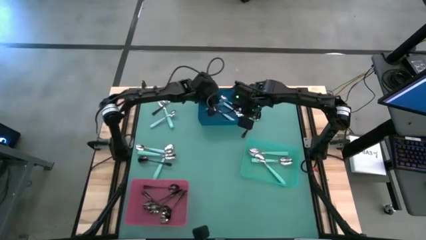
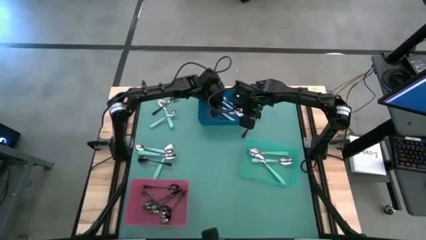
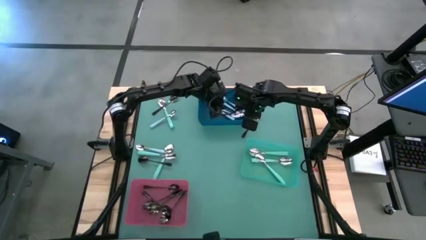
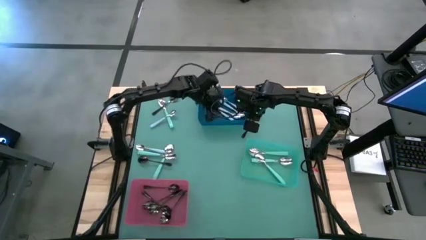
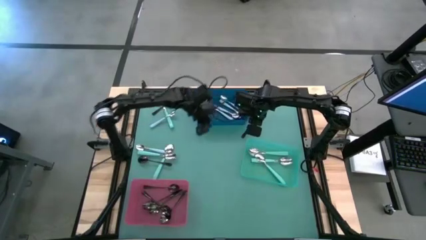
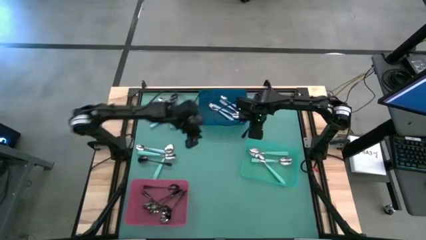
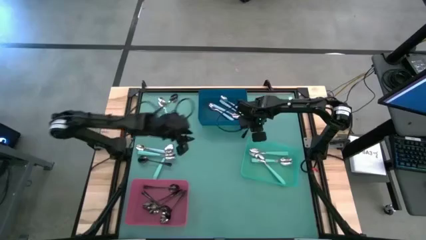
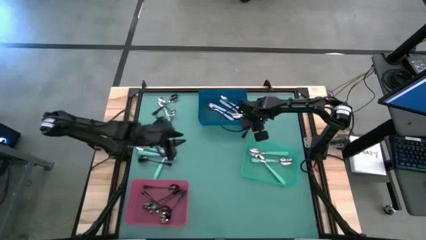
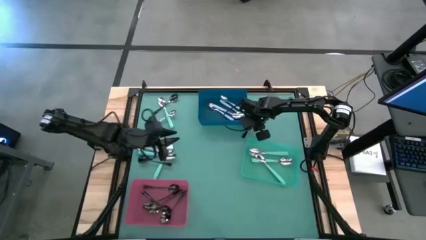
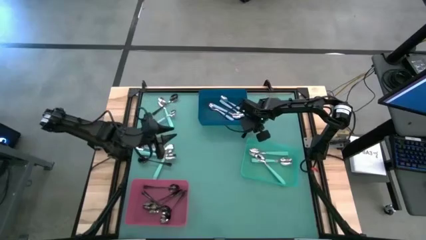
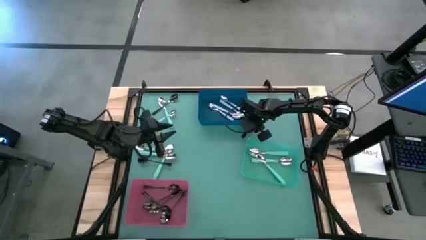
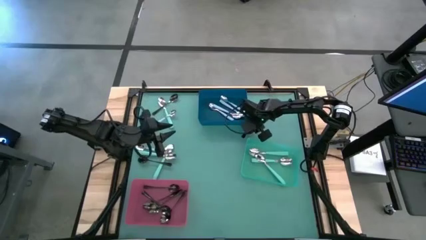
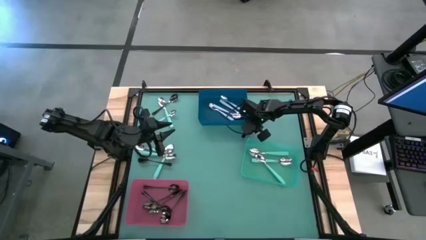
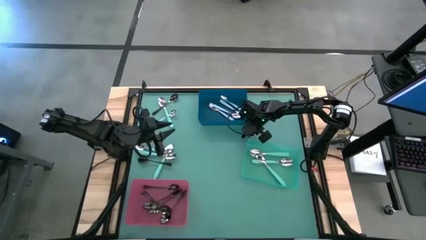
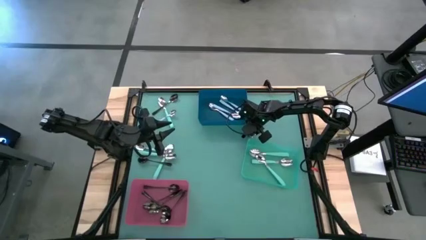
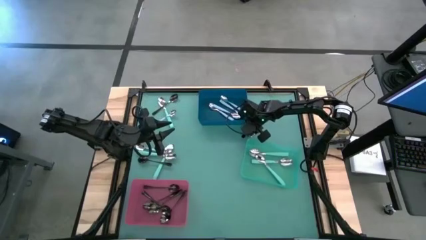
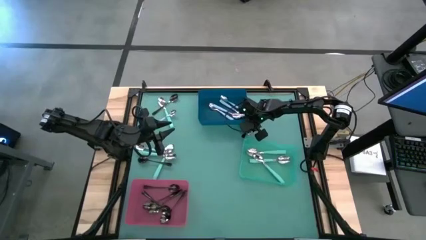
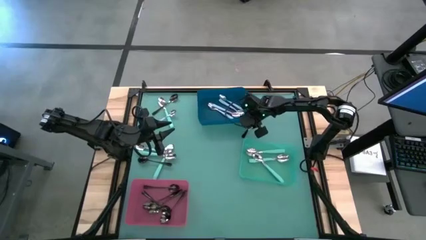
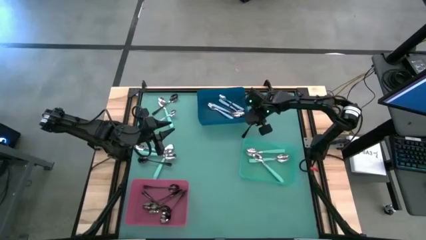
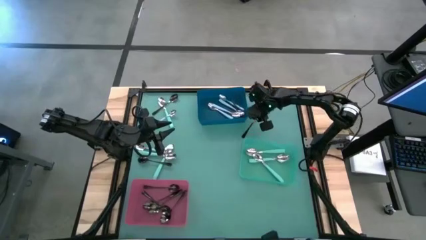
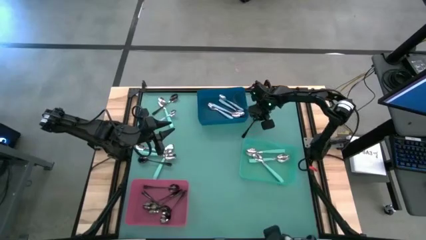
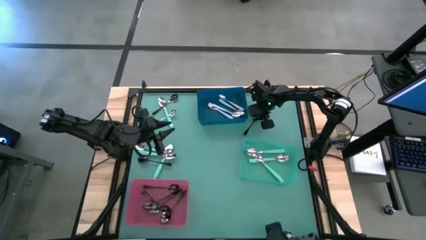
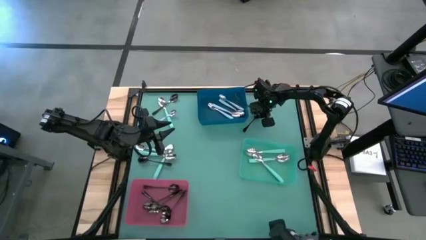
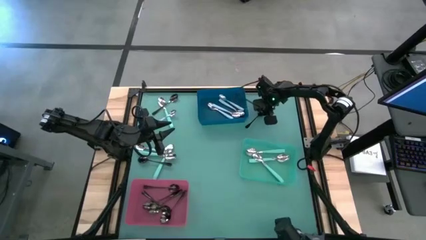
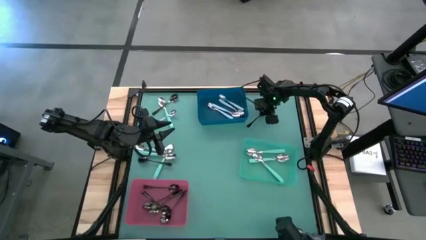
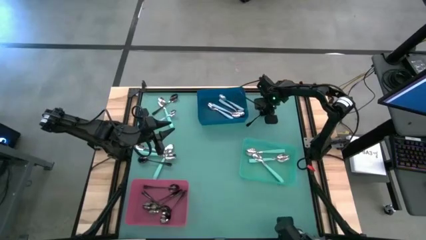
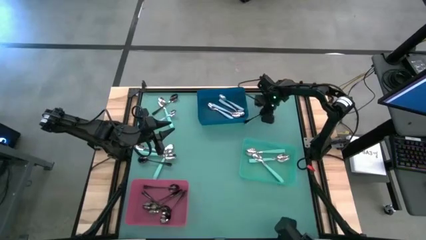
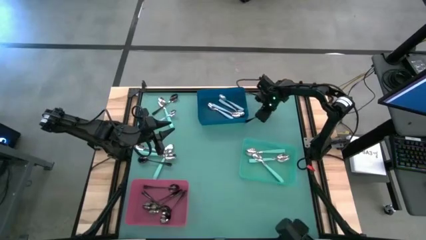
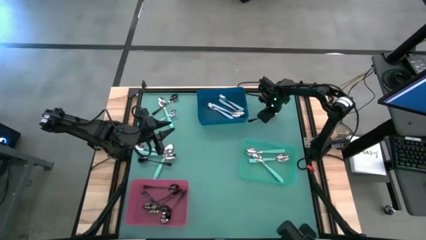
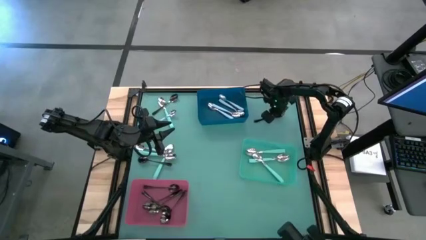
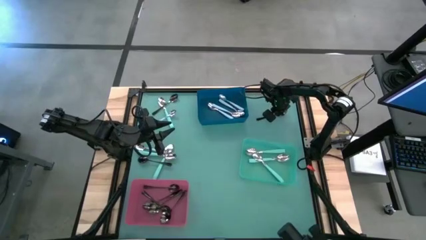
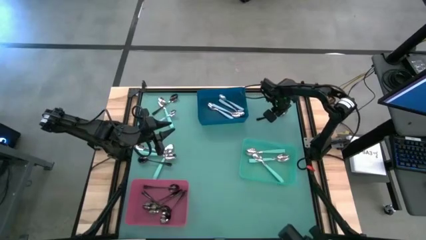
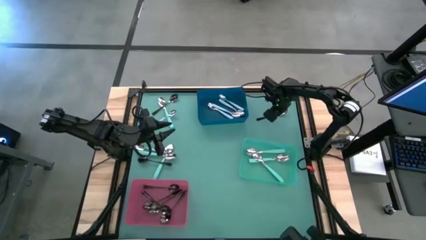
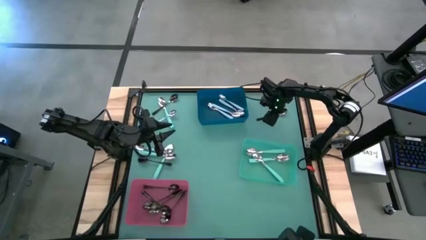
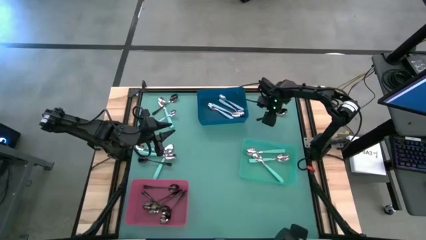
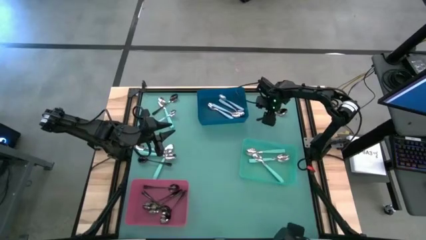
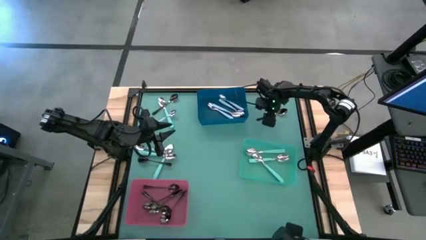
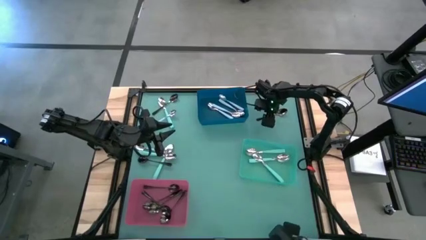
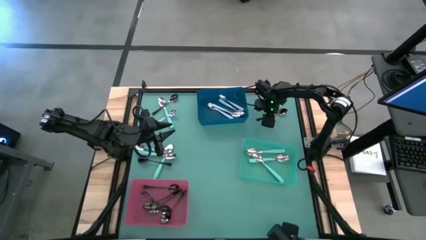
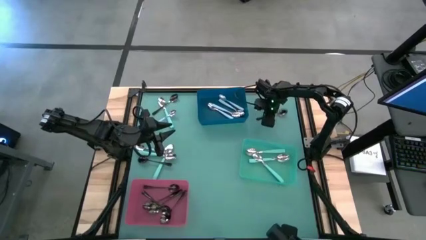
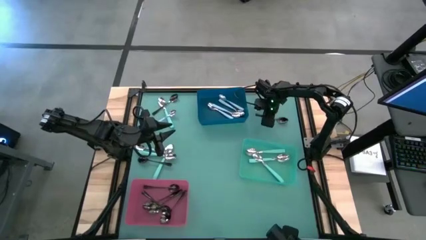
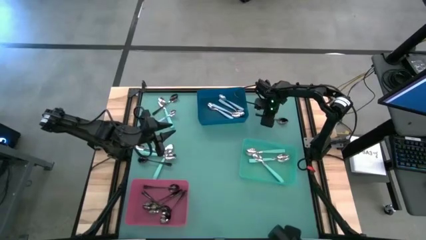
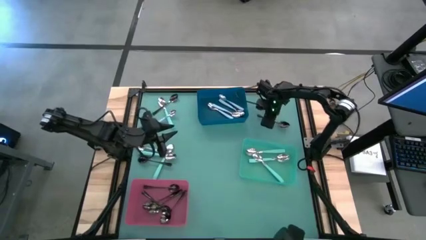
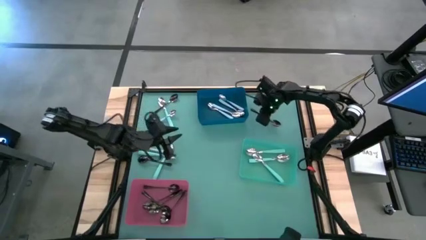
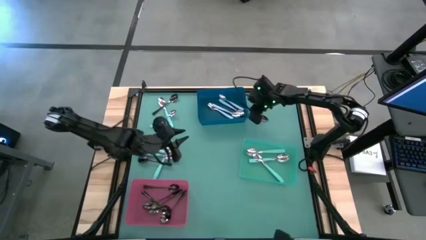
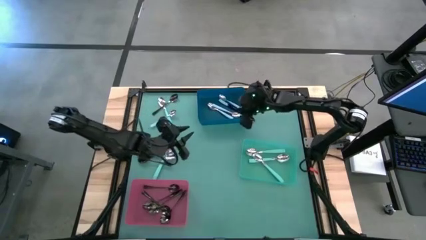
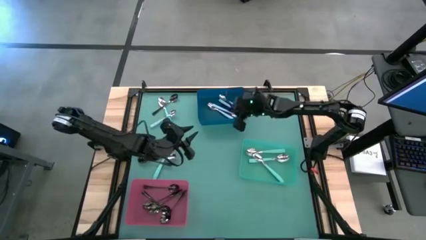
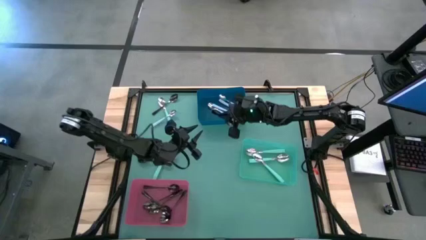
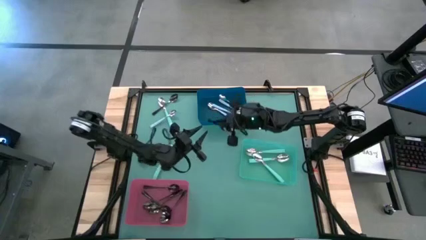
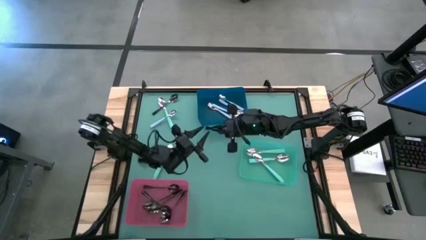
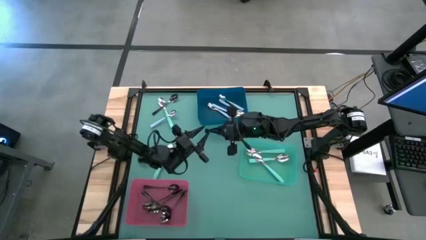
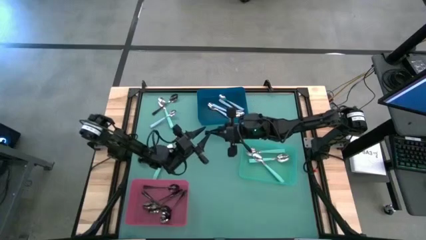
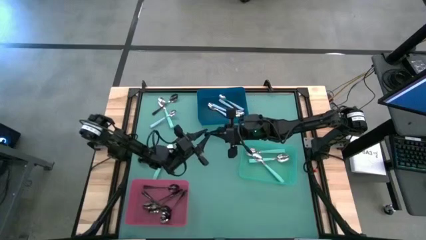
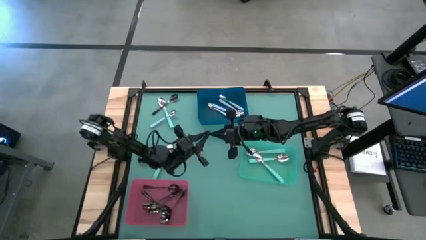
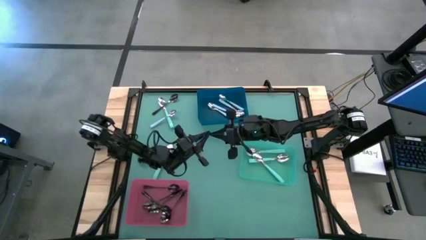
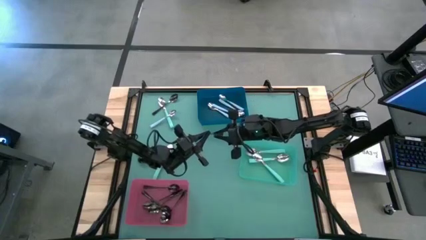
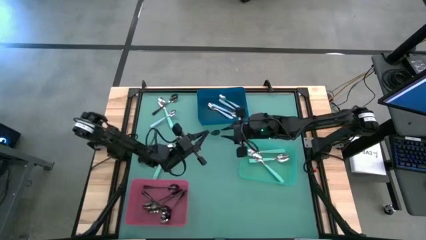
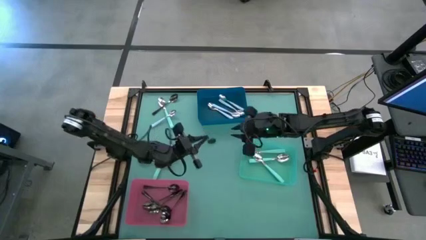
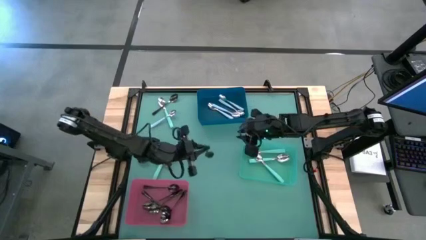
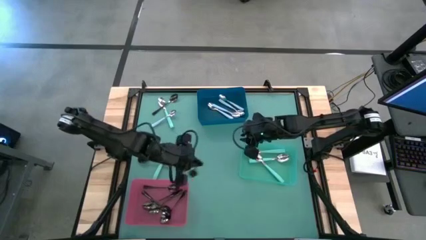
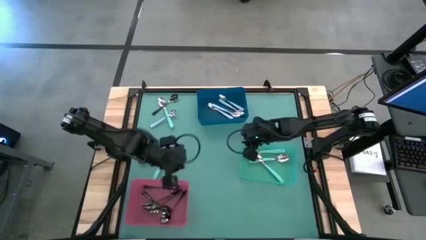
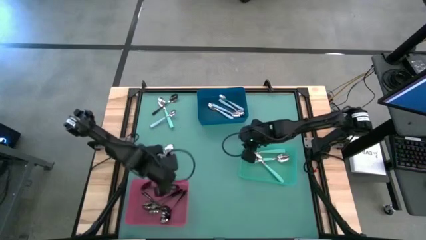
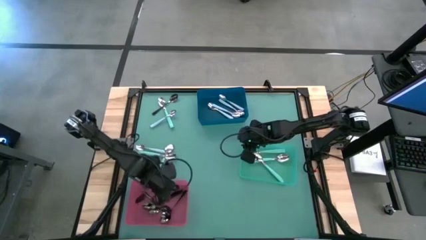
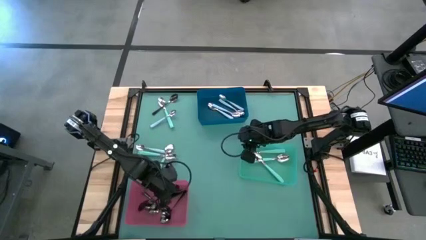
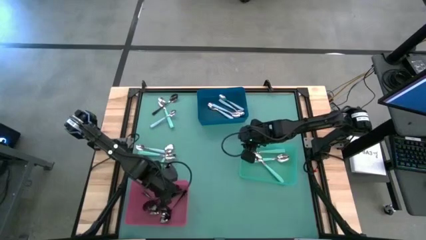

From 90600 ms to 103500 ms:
Task: Sort silverware by color (type)
Put the black spoon into the red bin

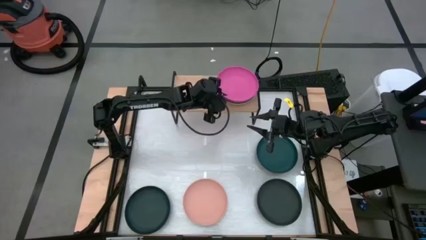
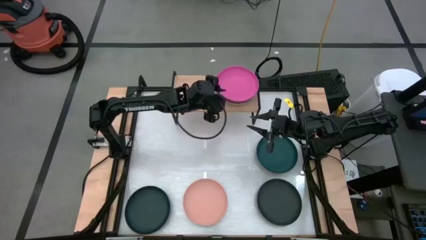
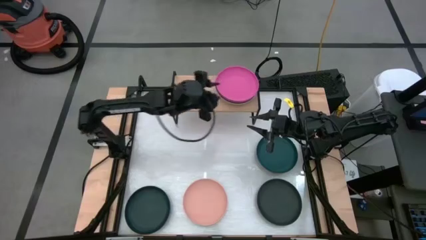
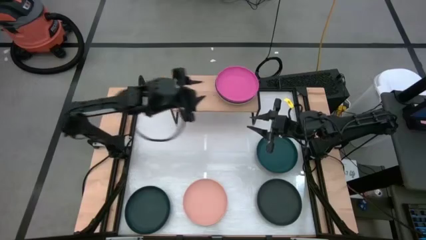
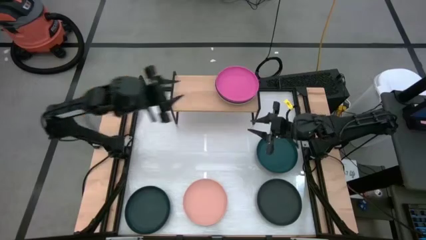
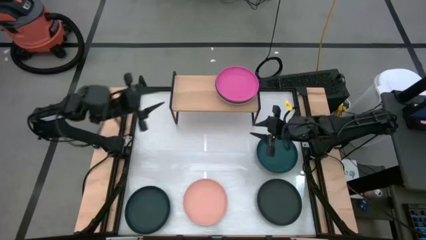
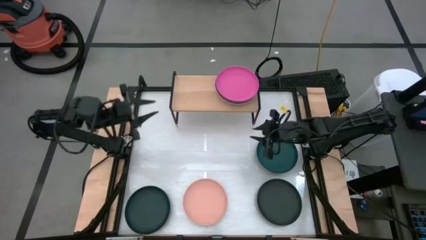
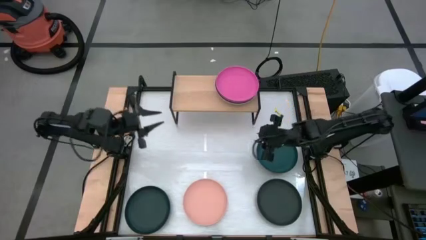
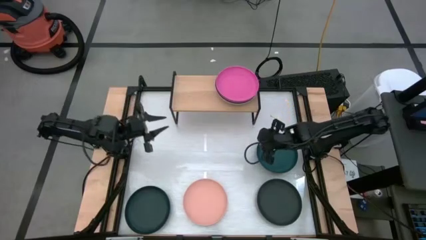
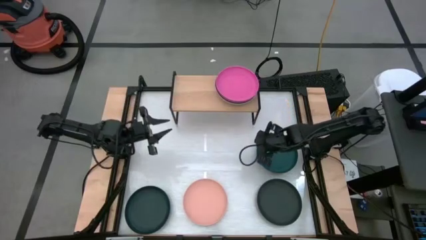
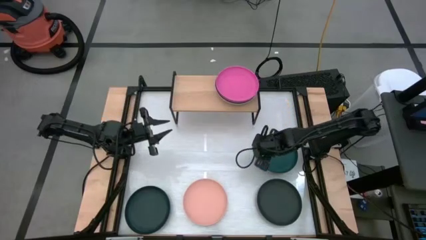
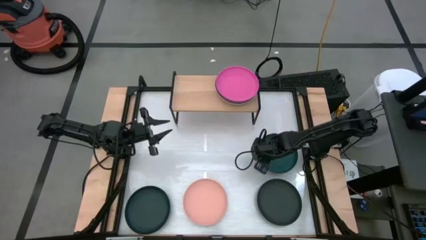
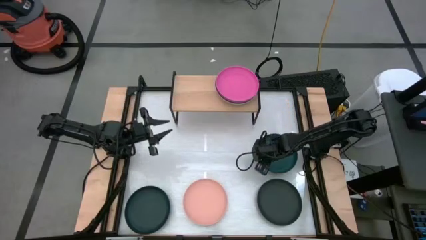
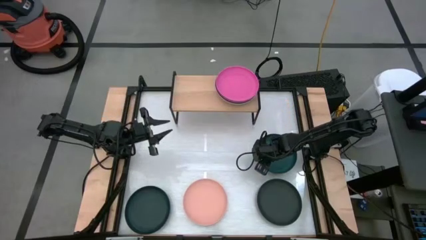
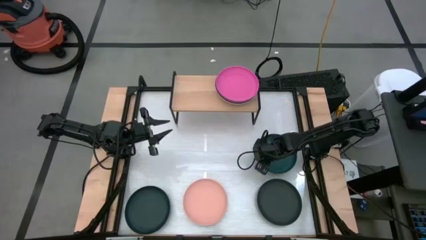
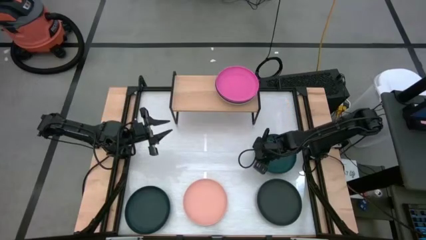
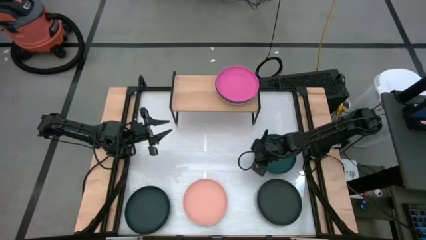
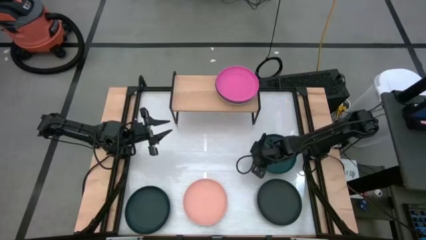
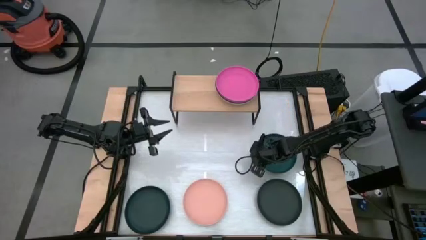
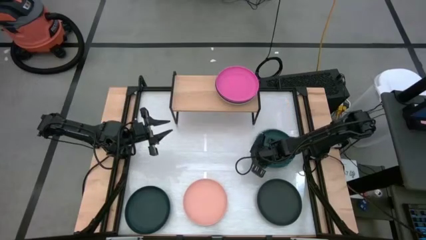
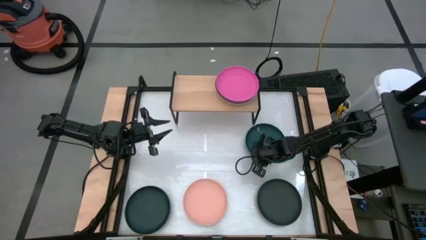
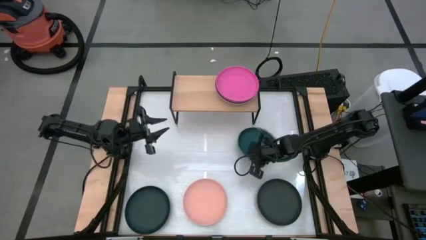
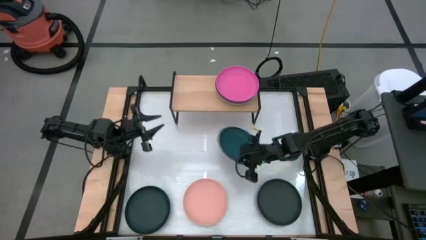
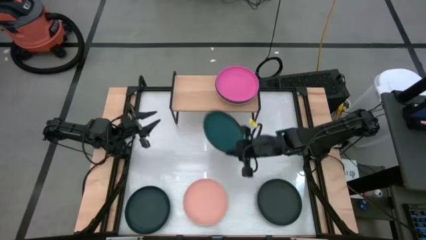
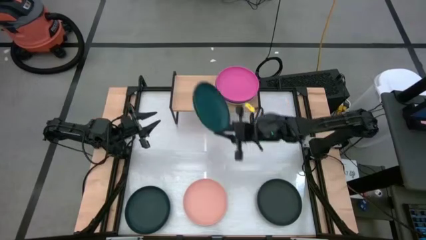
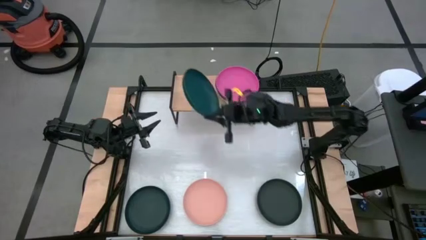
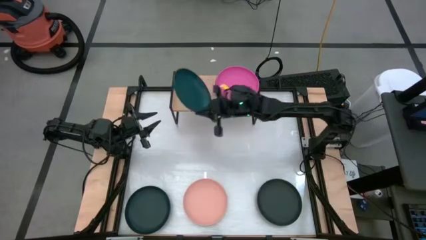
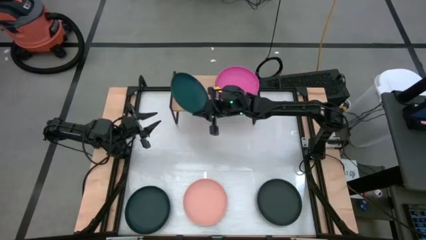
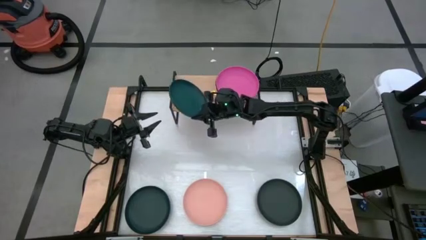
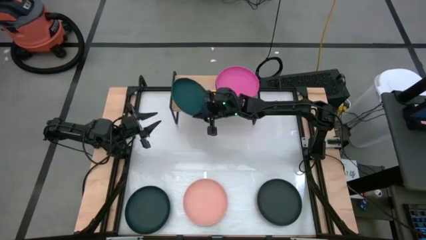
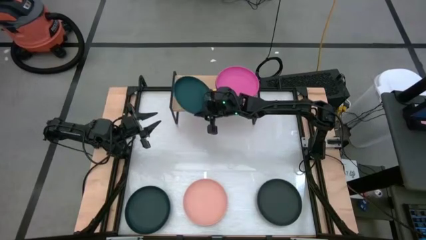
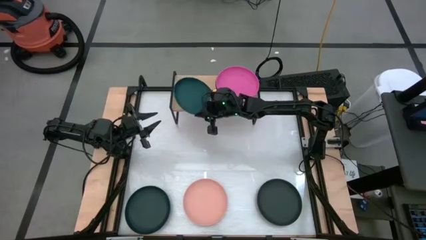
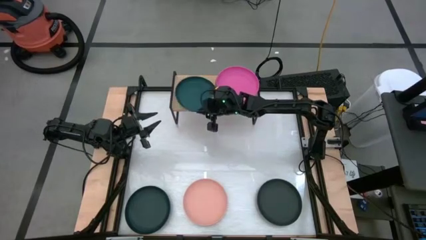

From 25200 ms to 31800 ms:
Task: Place and stack plates onto a shelf
Put the green plate on the shelf
